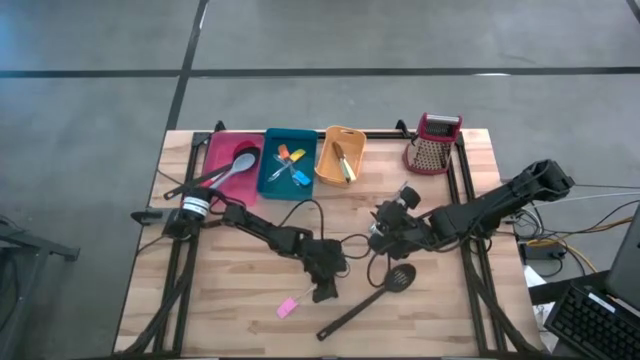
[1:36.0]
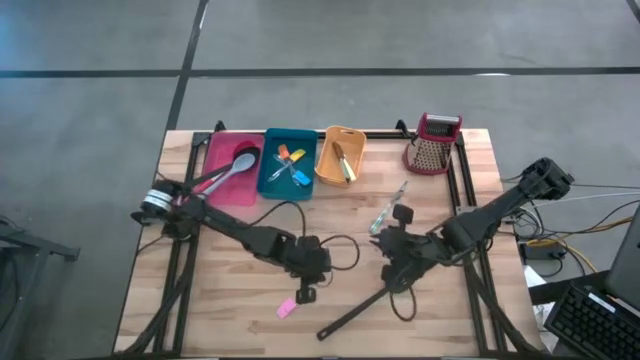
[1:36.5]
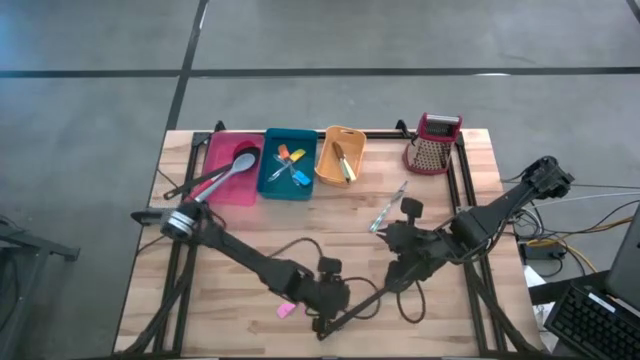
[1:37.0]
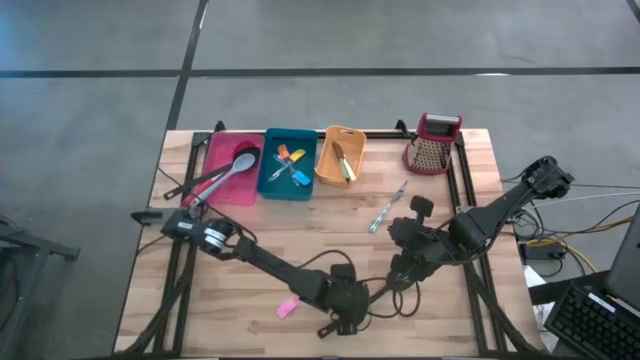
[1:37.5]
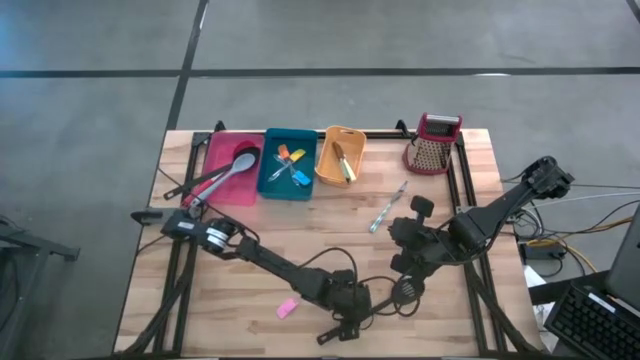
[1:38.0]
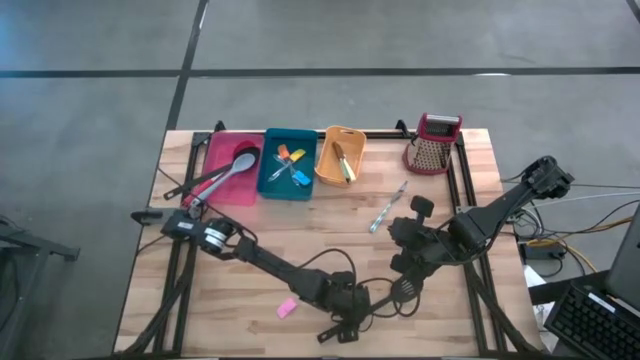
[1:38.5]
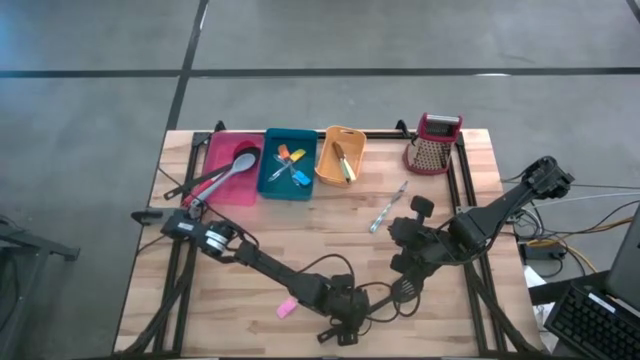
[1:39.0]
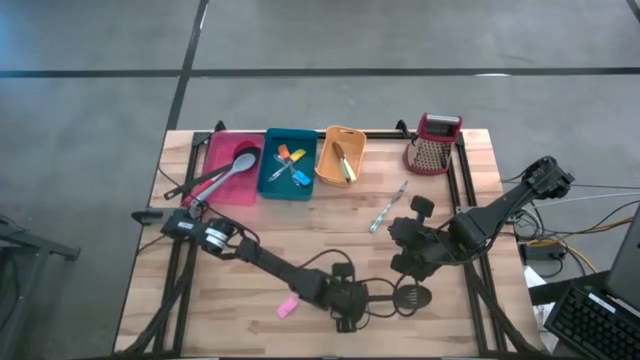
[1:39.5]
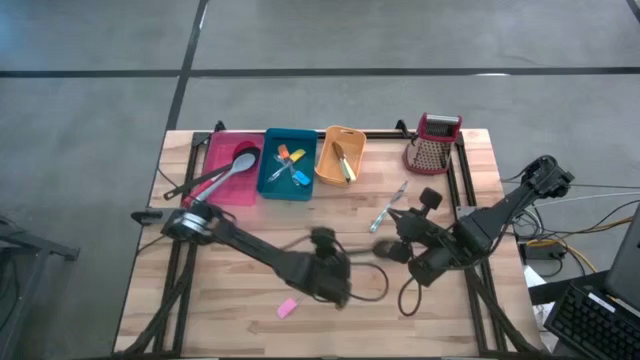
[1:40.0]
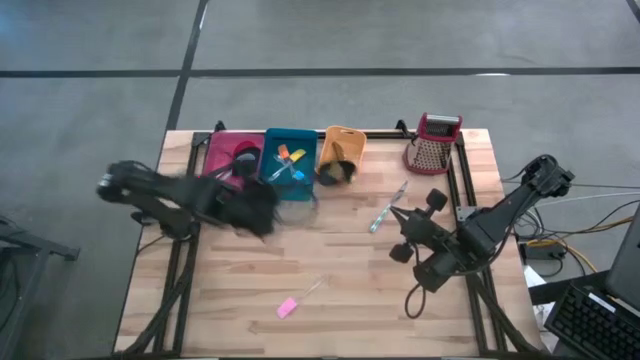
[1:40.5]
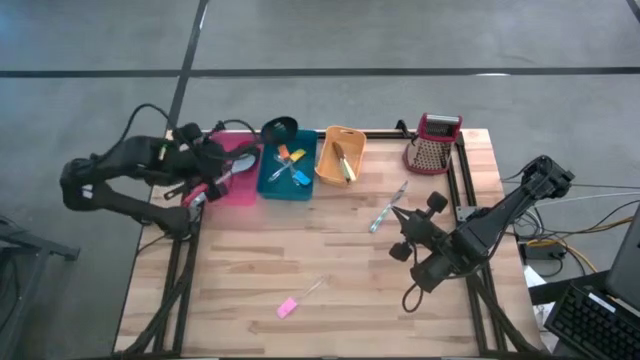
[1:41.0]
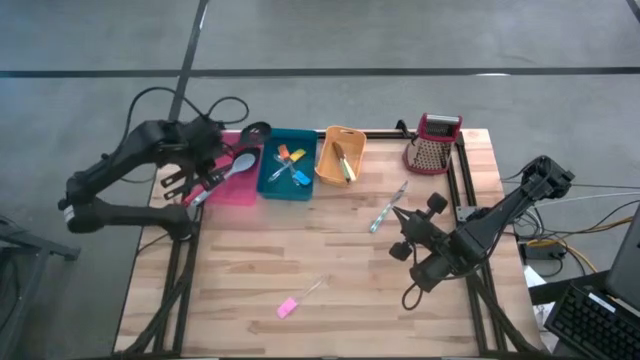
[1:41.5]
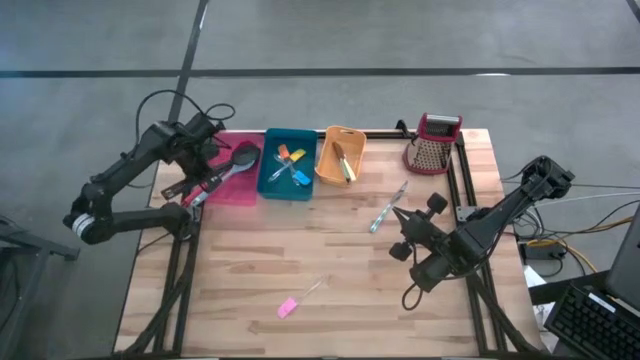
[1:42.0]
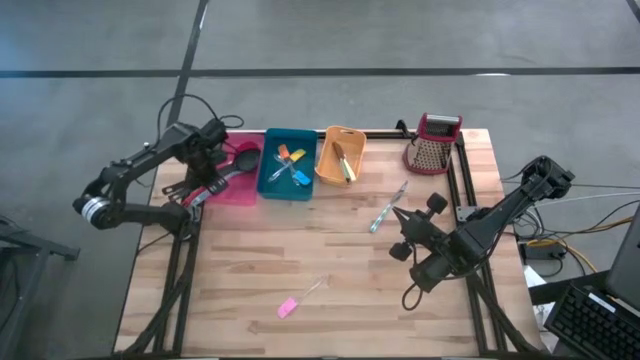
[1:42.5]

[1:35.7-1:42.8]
Task: Pick & Place Kitchen Items
Put the black serving spoon into the pink bin

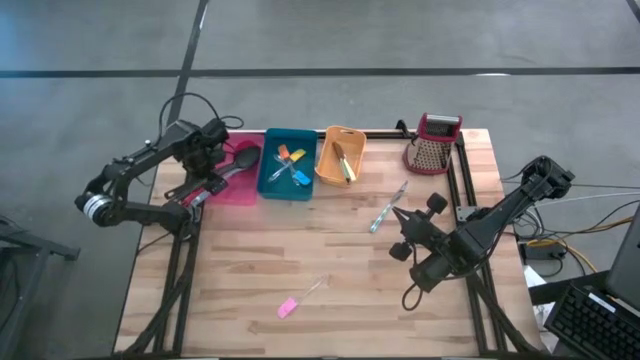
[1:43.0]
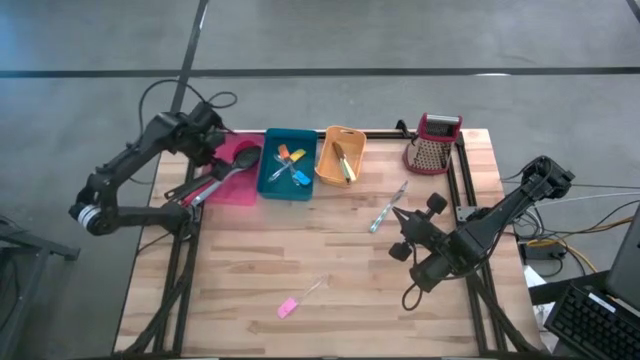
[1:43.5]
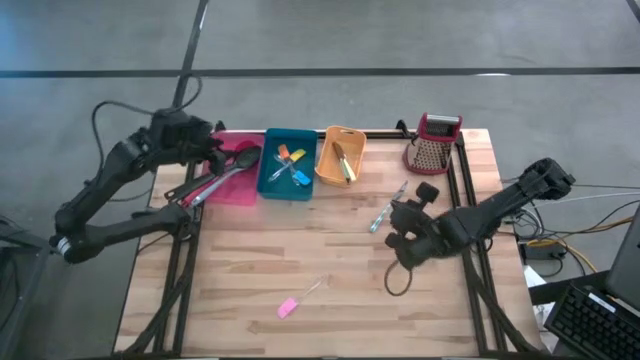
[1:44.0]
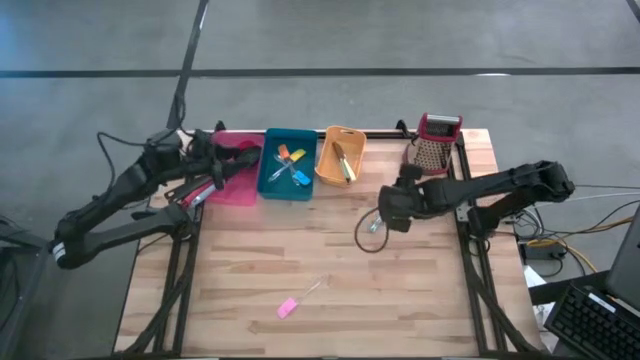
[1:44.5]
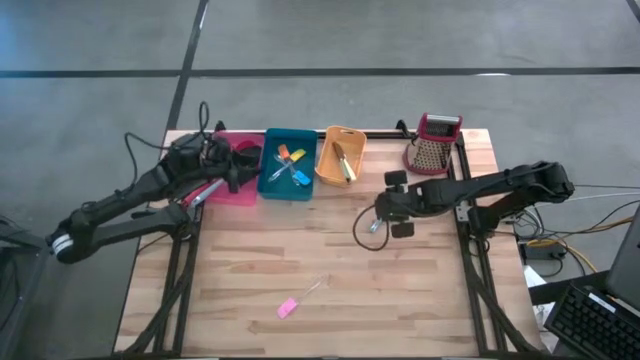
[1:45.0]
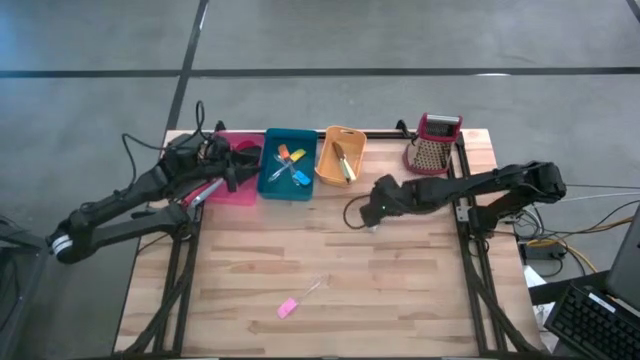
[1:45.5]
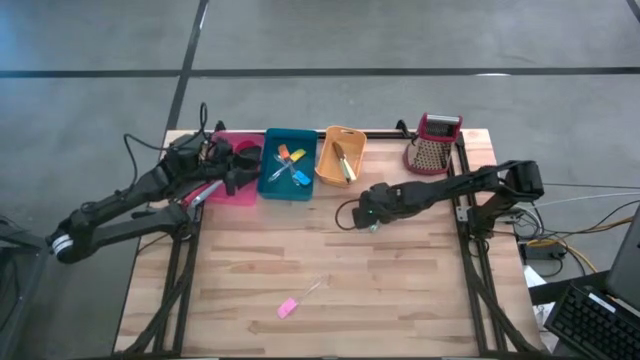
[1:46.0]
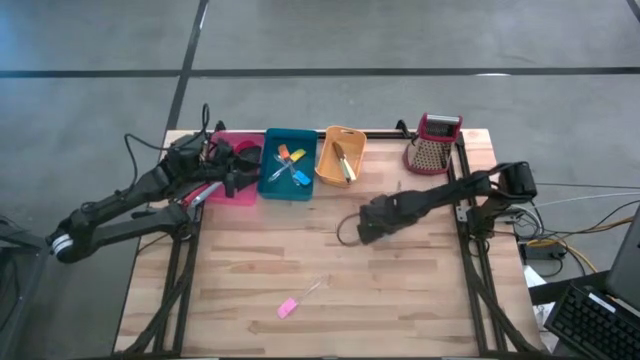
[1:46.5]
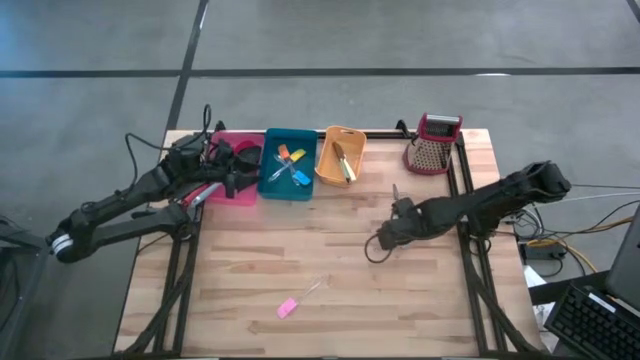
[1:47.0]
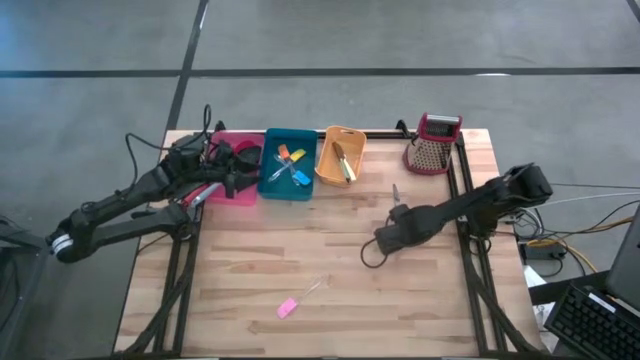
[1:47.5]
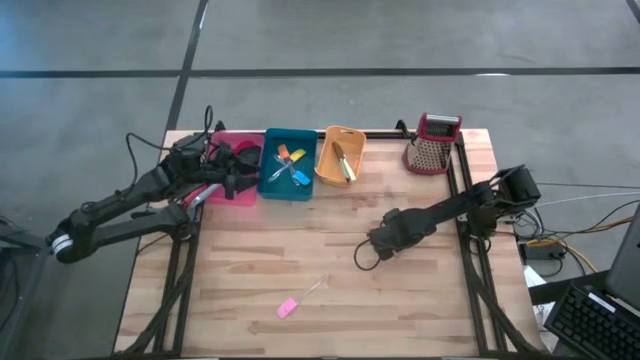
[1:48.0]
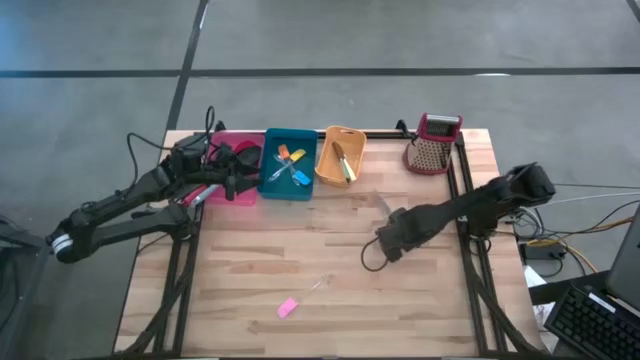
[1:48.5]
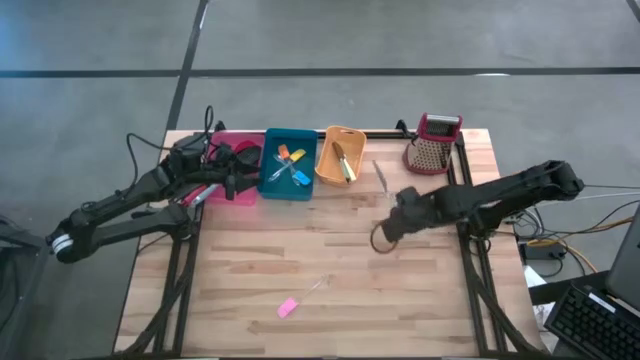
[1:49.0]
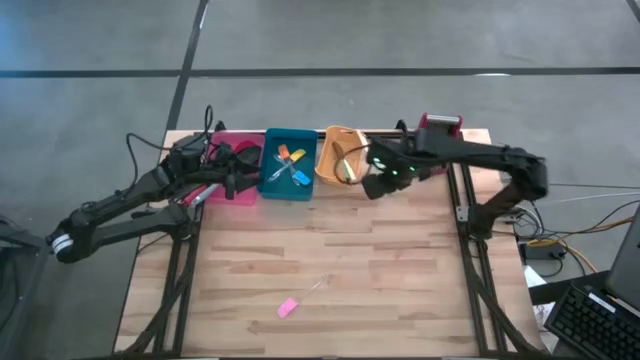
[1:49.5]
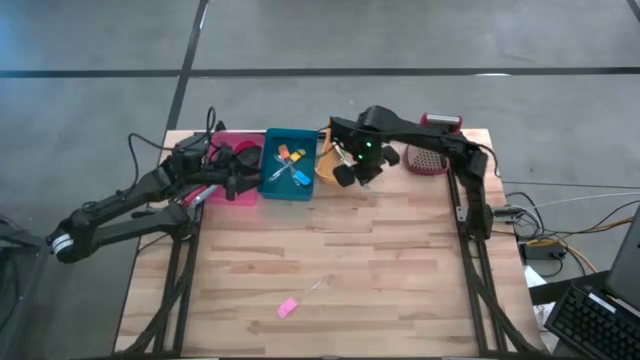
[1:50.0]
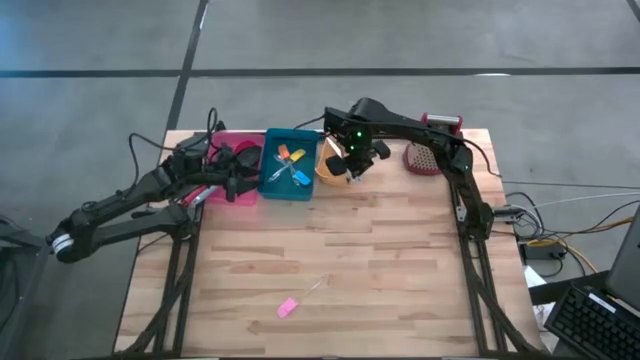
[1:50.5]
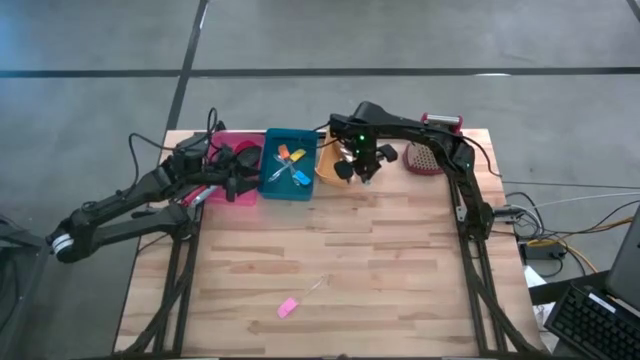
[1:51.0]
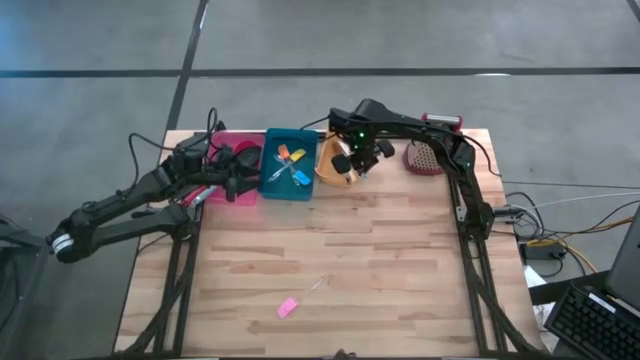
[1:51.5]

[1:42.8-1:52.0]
Put the blue knife into the yellow bin

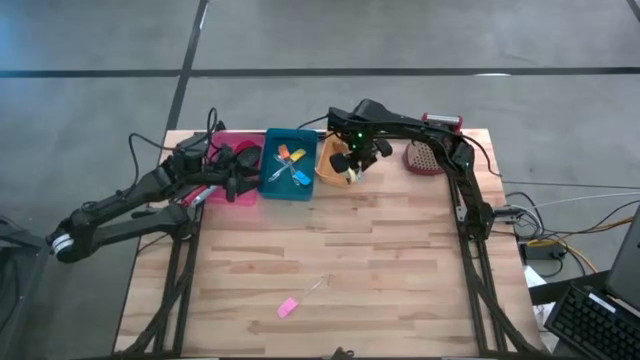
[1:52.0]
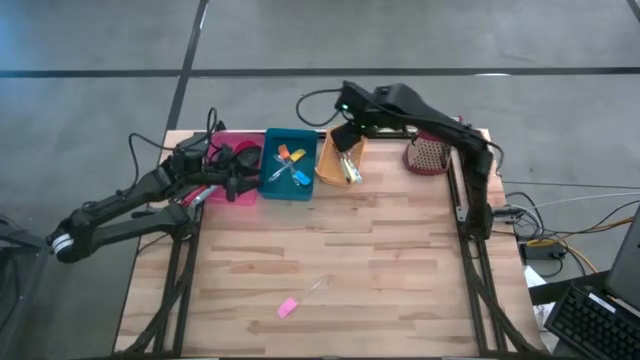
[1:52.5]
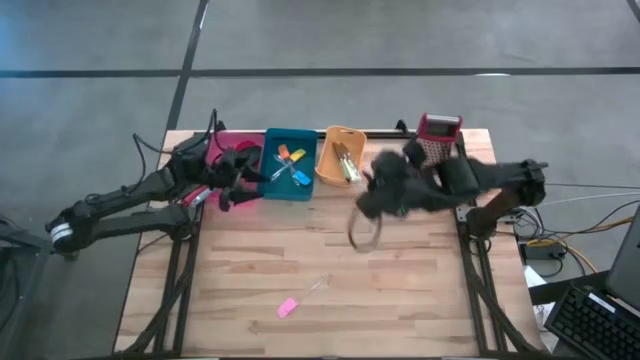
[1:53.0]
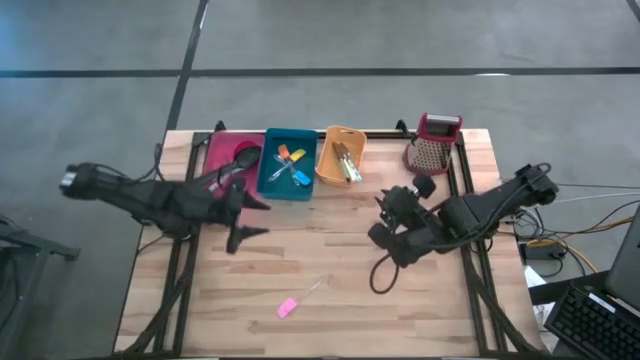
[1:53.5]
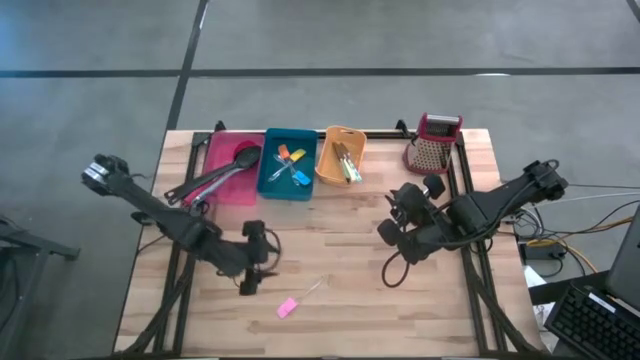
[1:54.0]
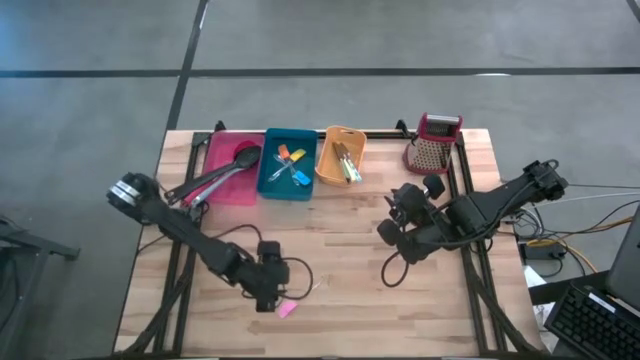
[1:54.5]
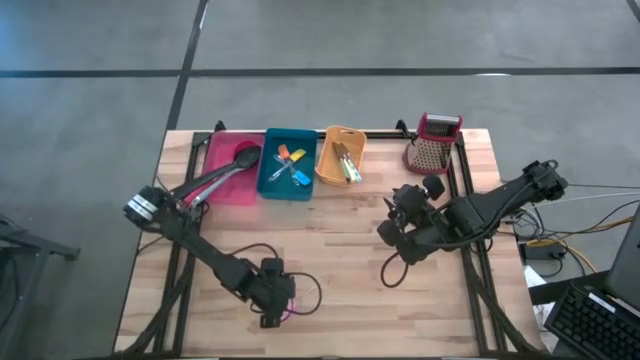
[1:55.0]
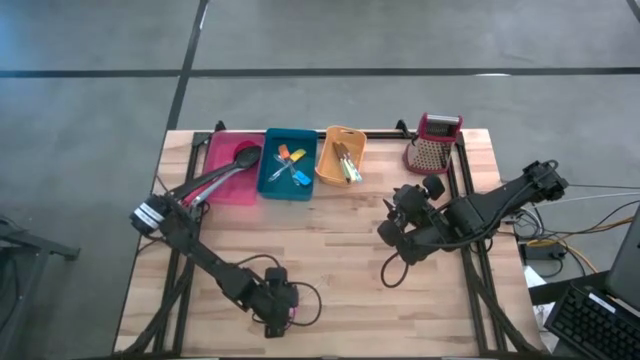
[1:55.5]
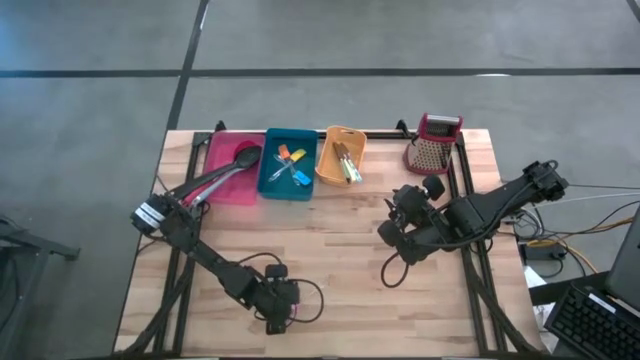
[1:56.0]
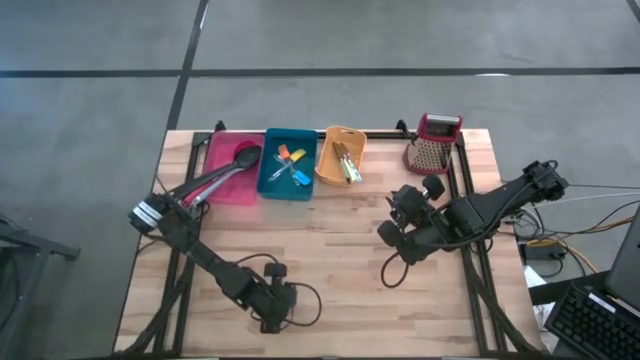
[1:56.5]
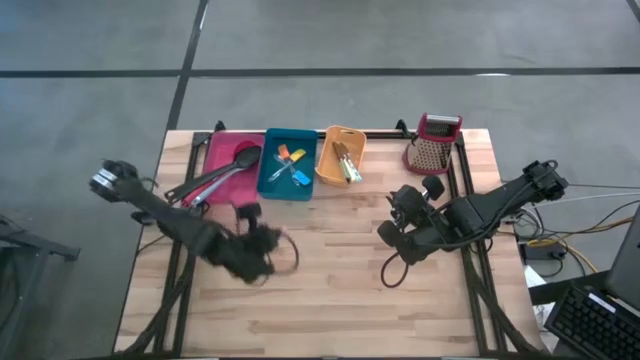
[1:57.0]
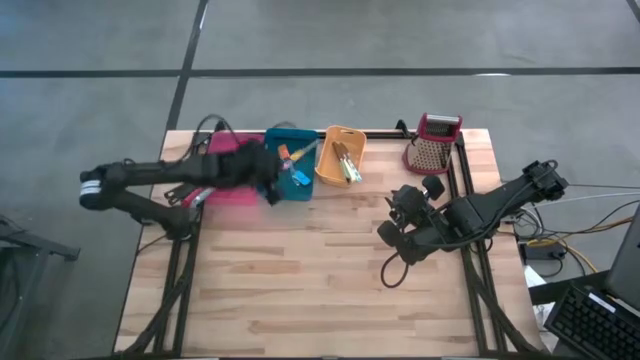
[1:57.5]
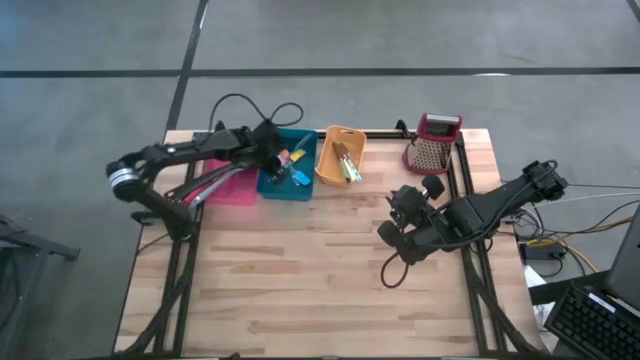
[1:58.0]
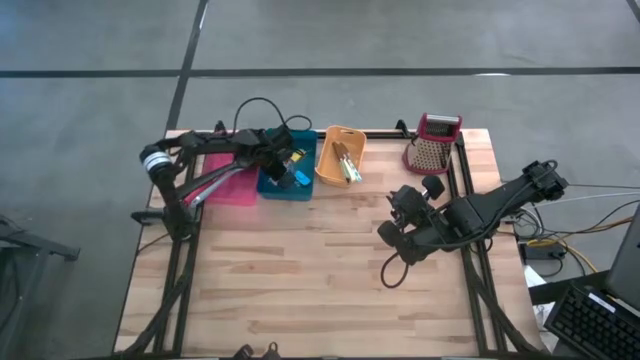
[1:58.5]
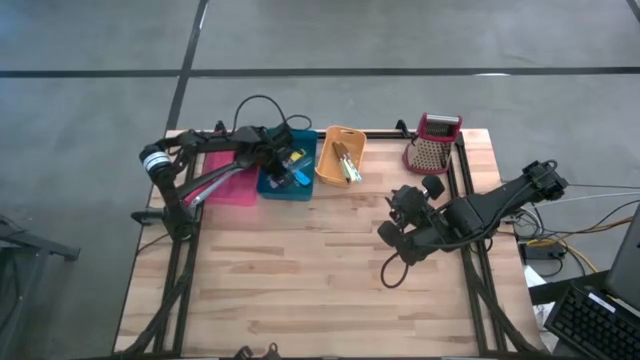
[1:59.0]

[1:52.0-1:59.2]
Put the pink spatula into the blue bin
